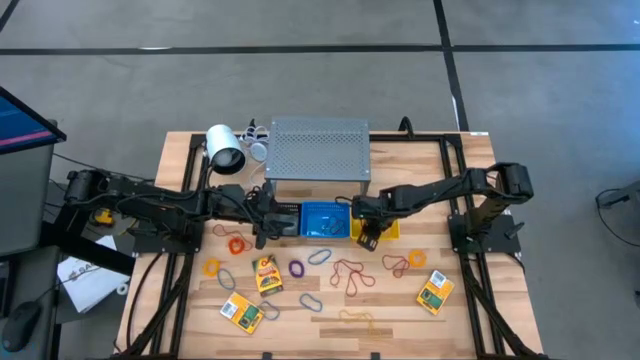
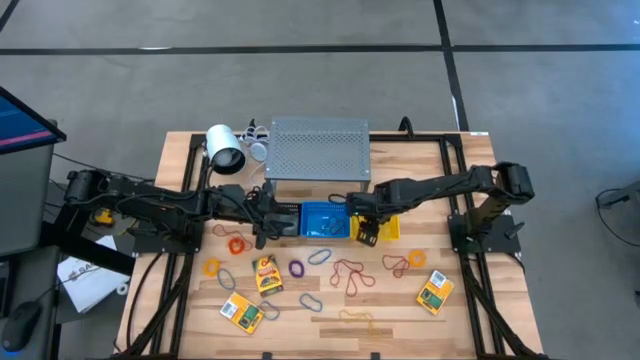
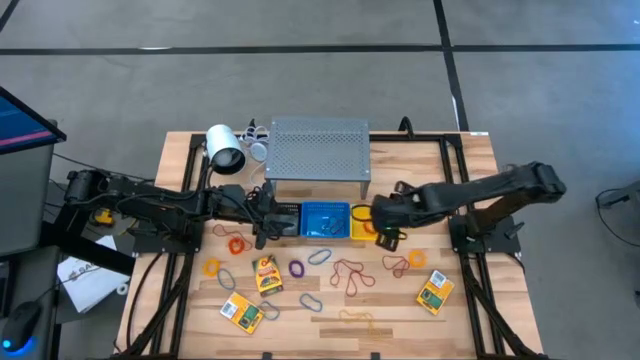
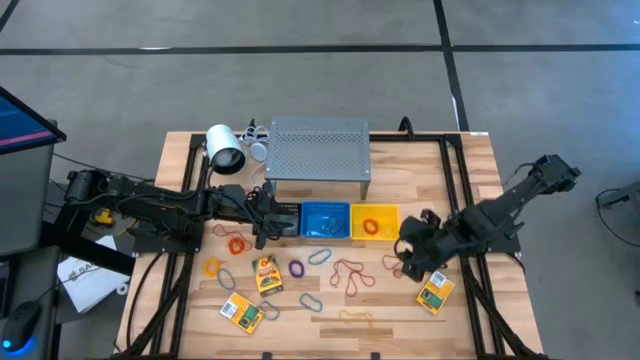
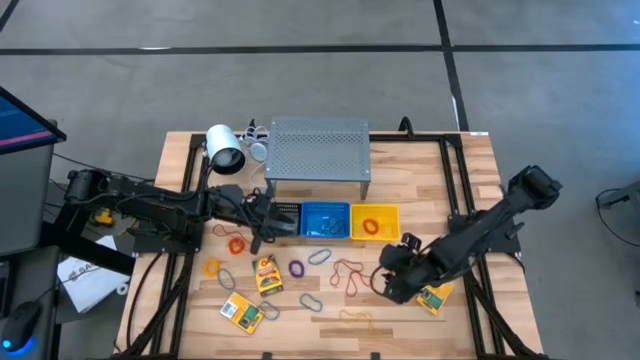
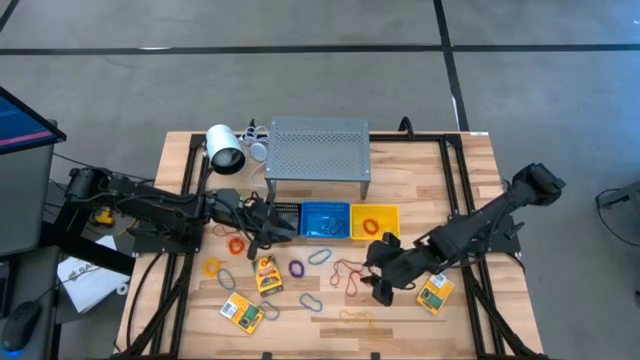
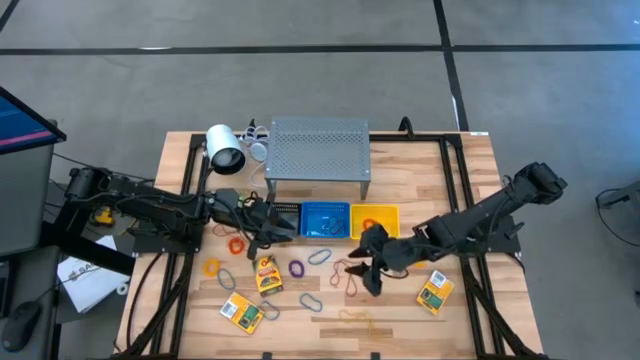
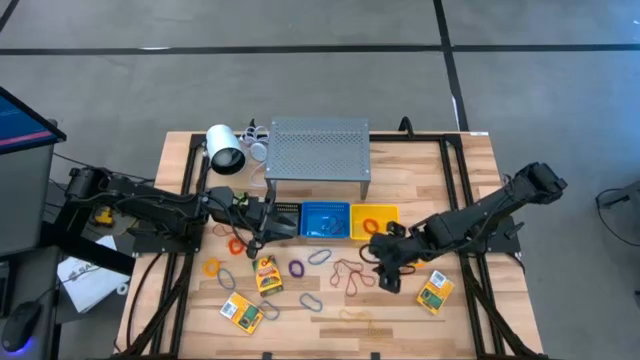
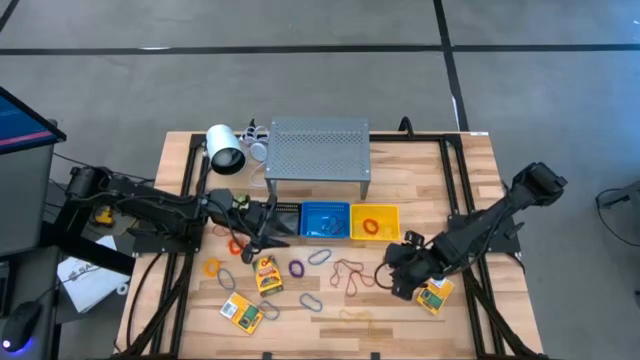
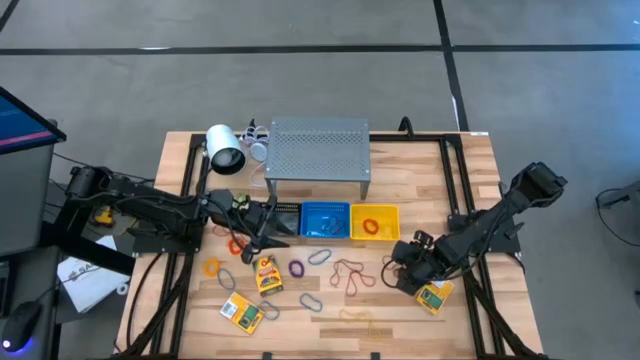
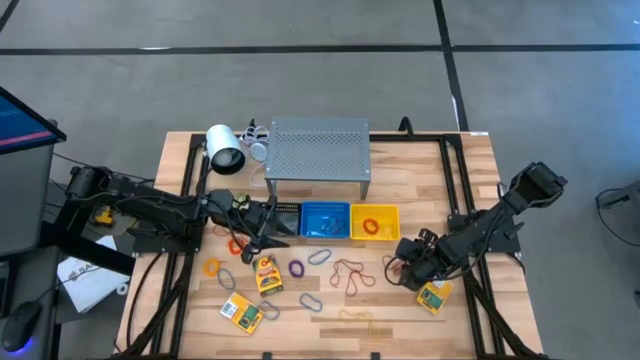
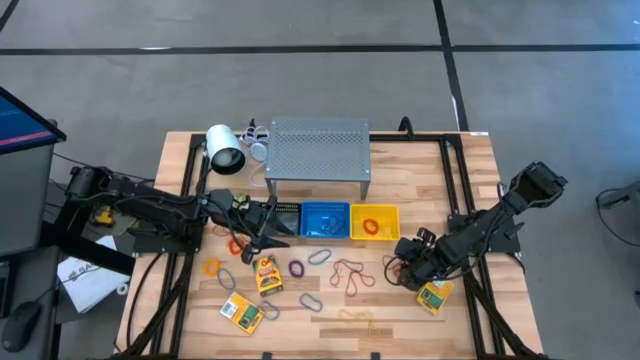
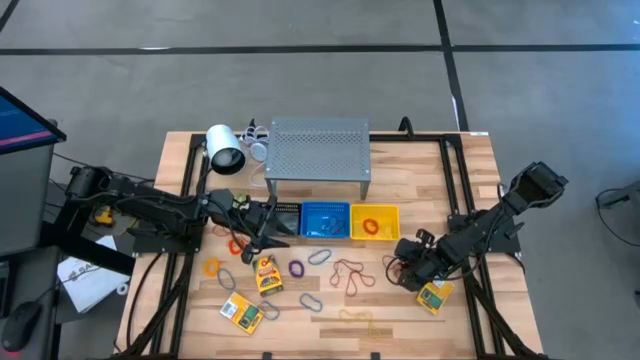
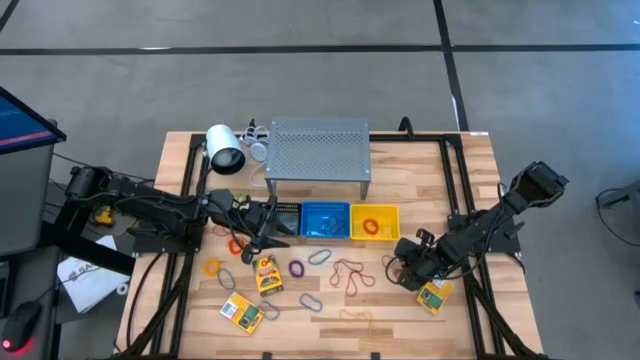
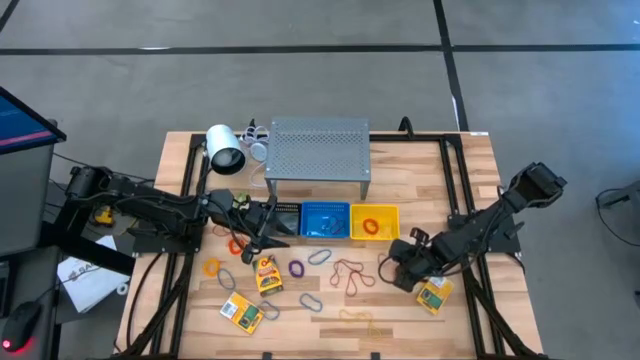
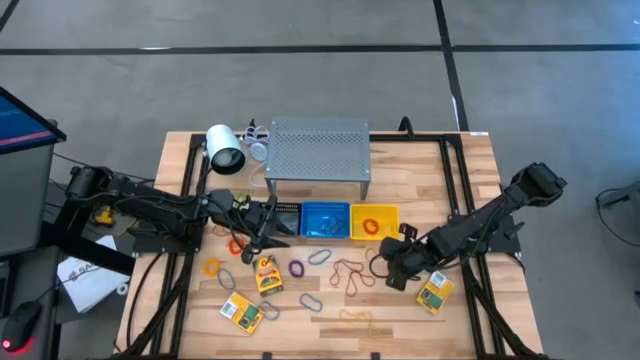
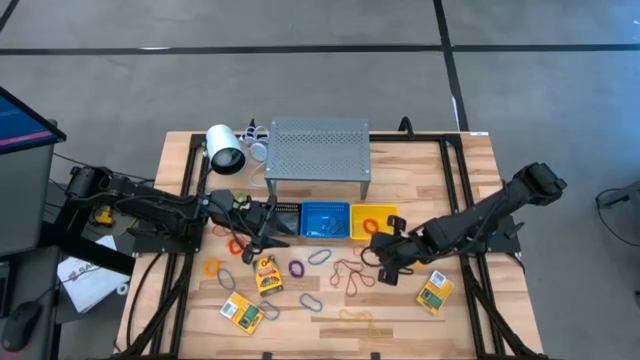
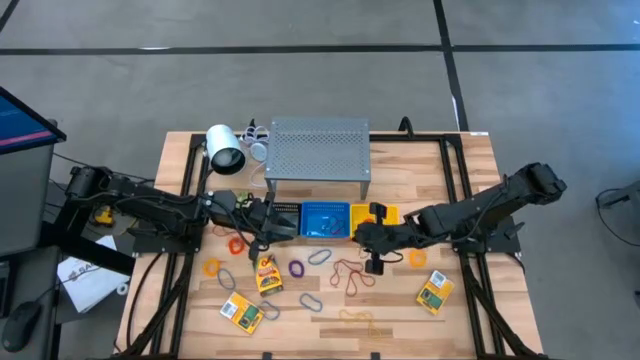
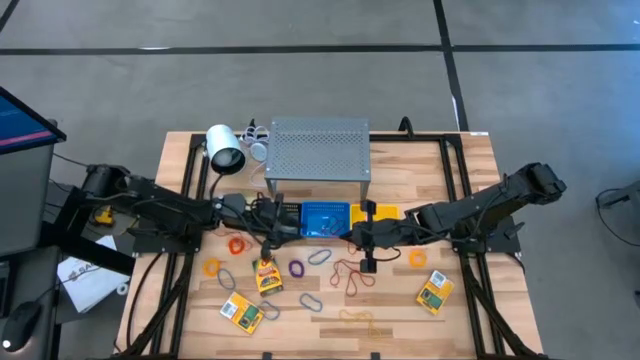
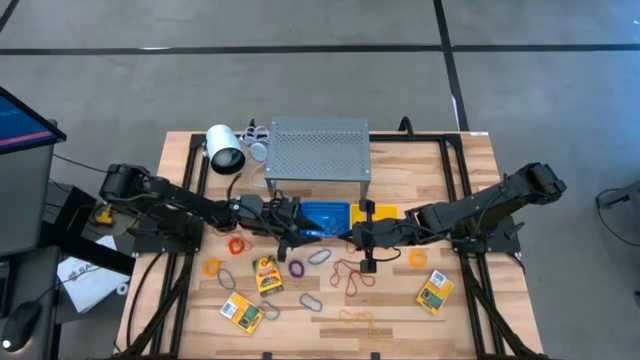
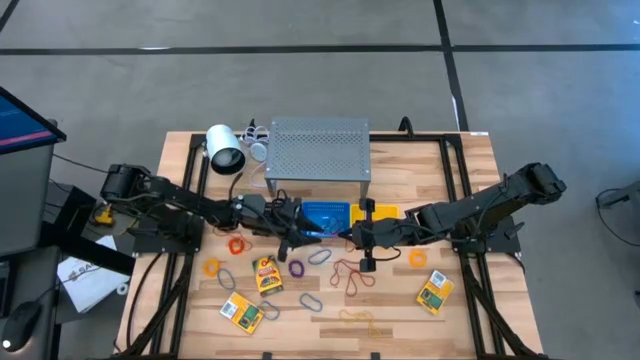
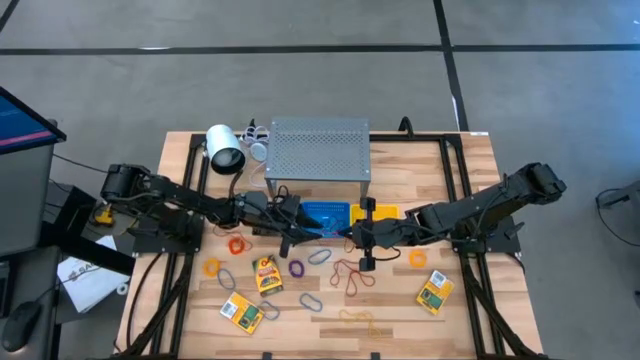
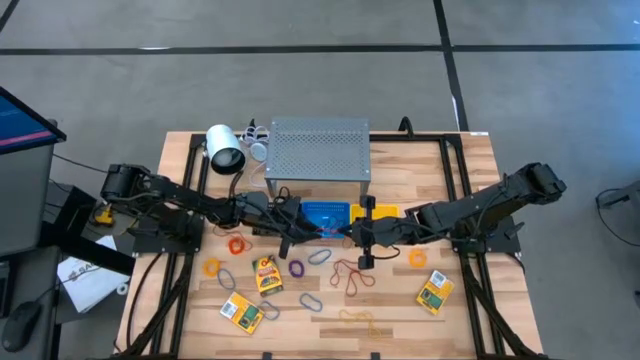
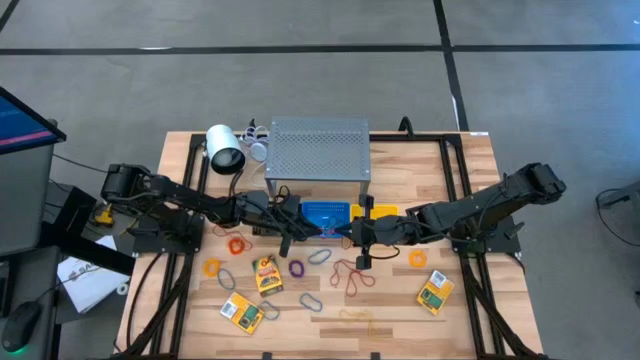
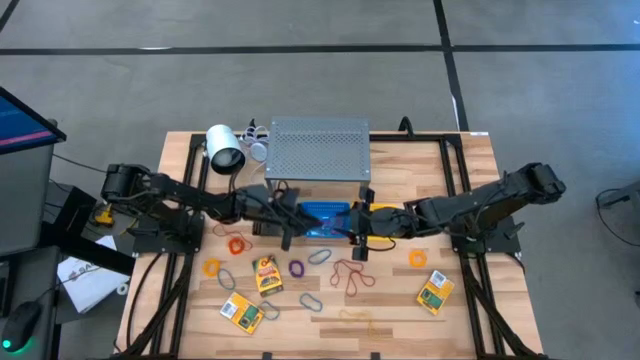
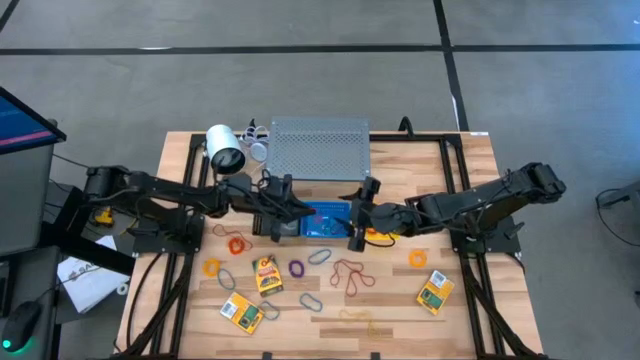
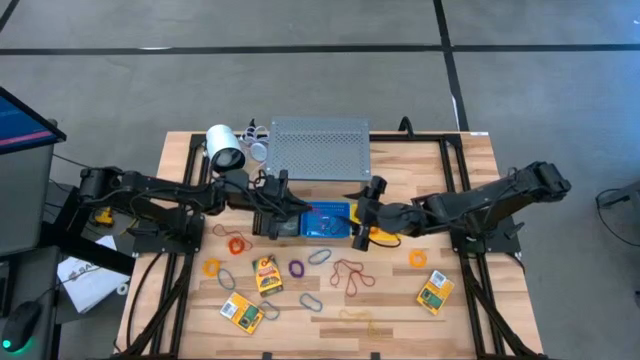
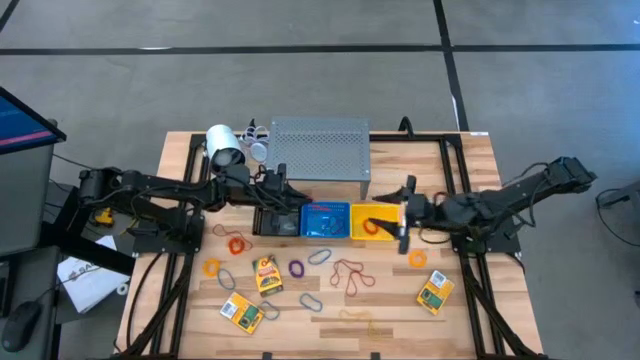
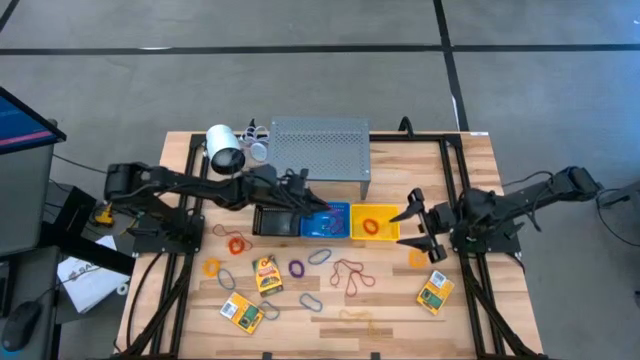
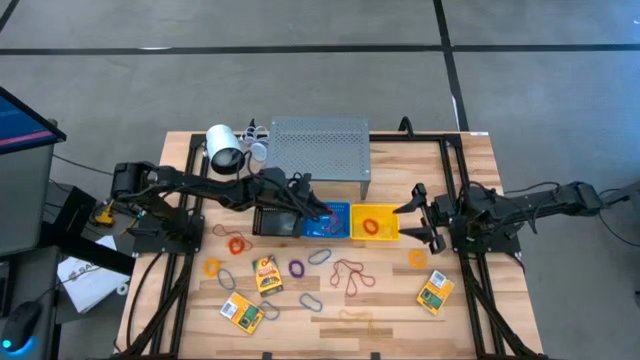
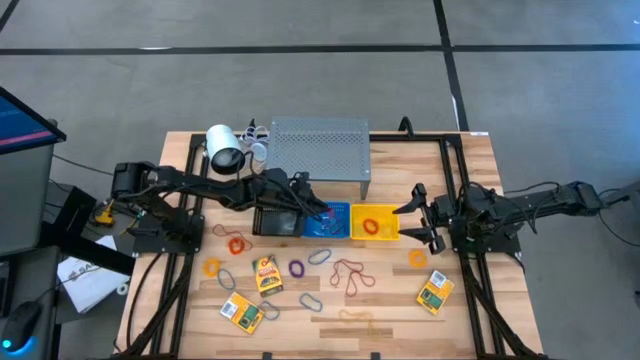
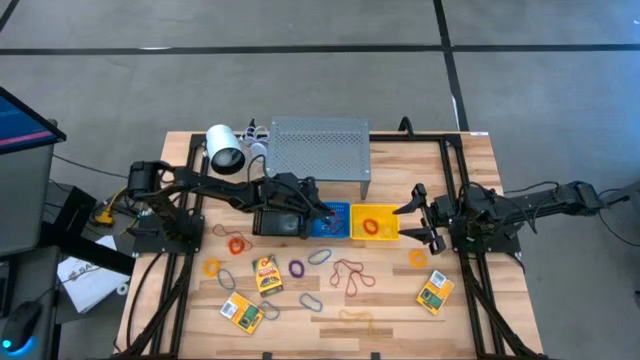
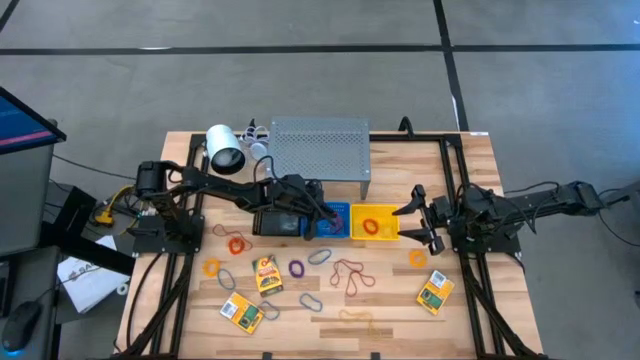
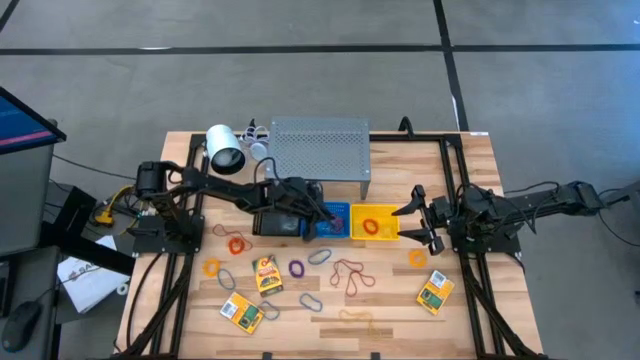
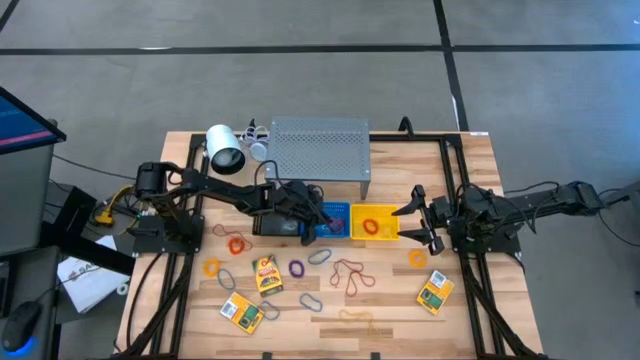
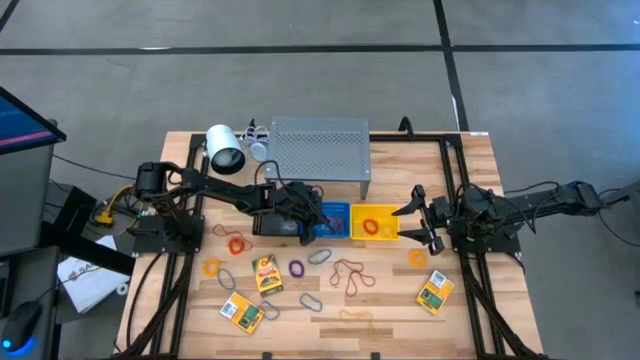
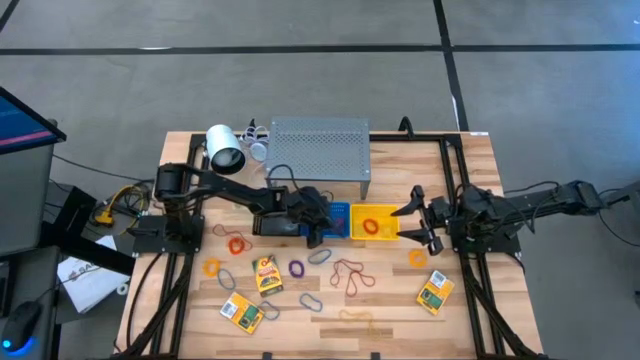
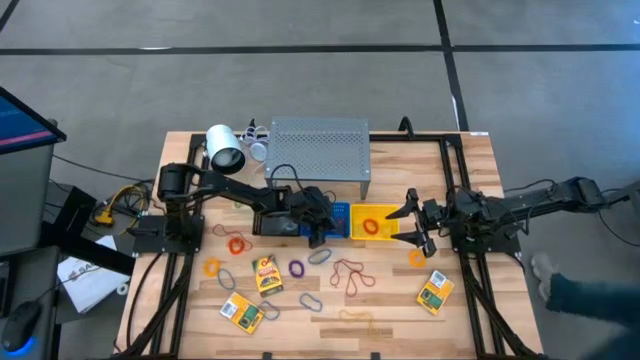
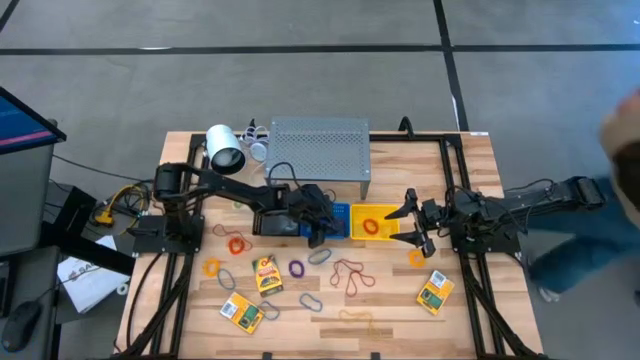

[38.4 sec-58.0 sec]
Task: Pick & Place Office Desk Supplies
Put the red rubber band into the blue bin

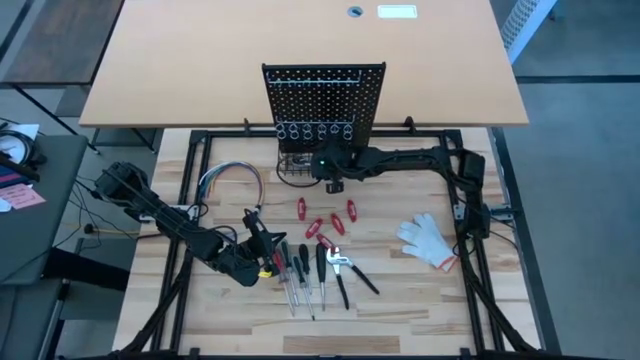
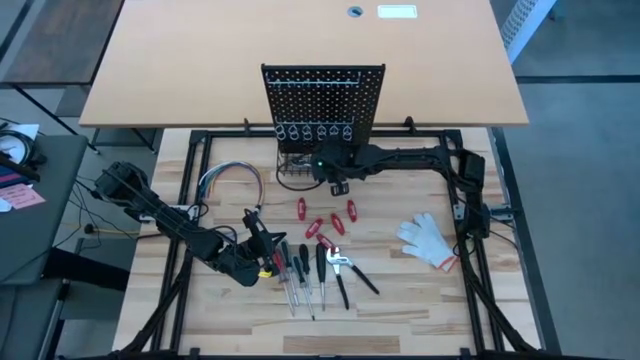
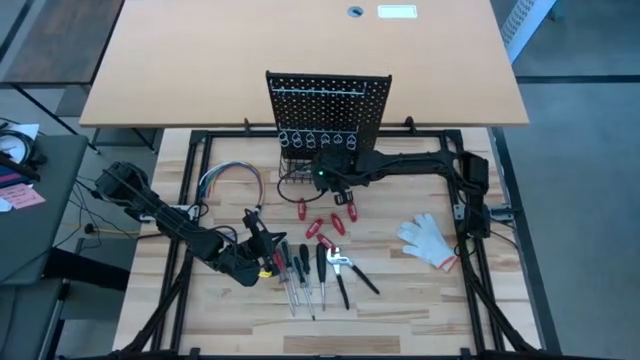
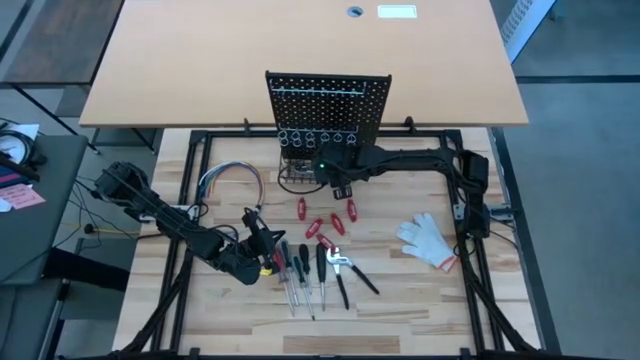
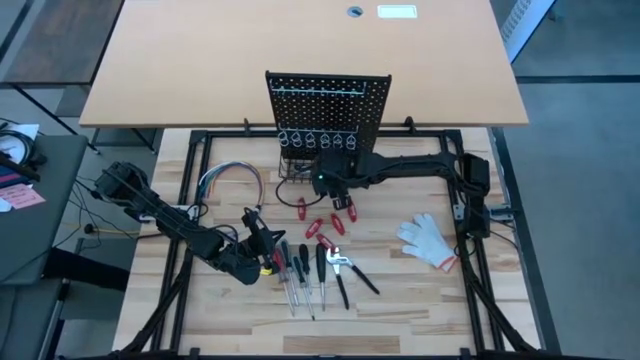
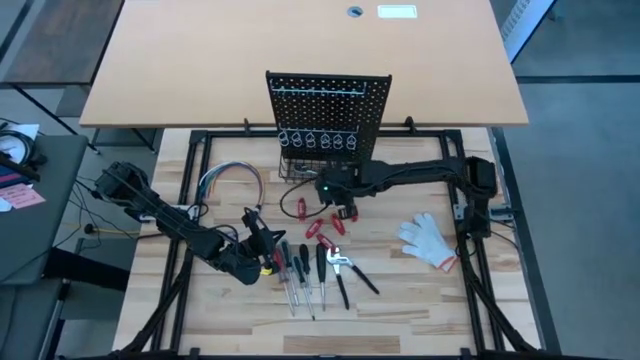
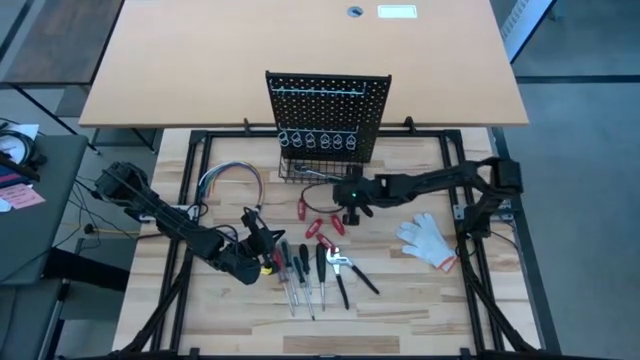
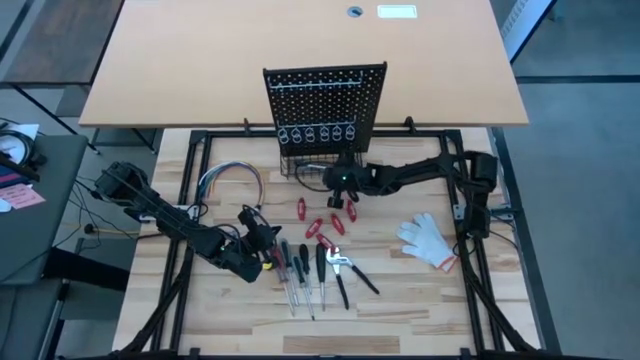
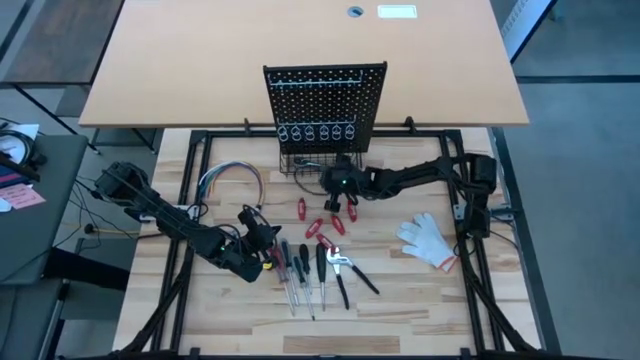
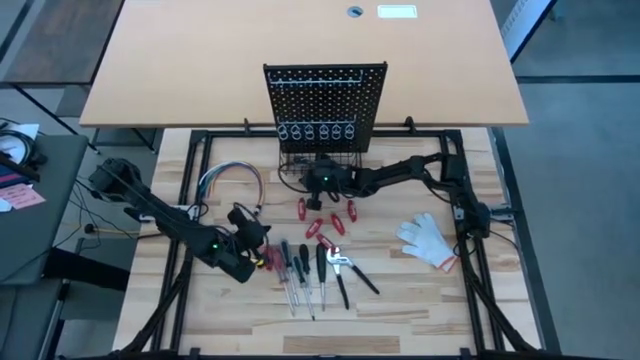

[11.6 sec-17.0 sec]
Task: Hang tools onto peg board
Adjust the pegboard
